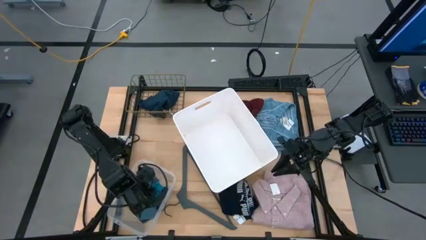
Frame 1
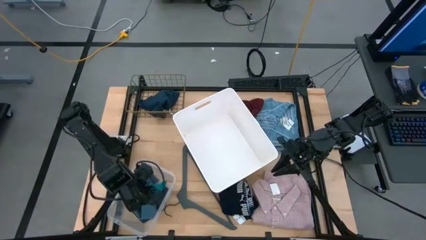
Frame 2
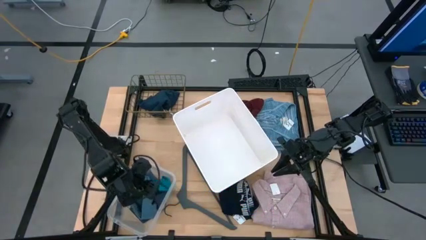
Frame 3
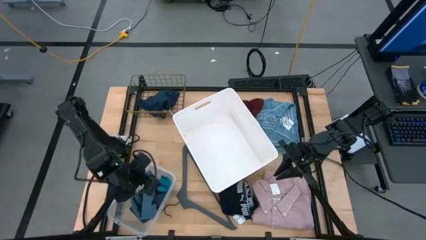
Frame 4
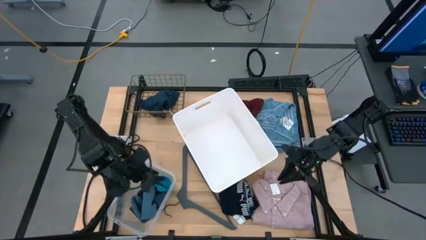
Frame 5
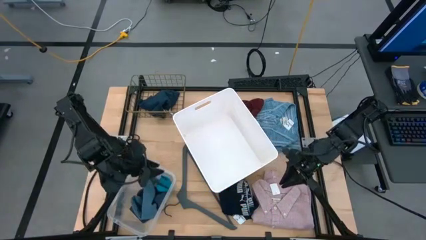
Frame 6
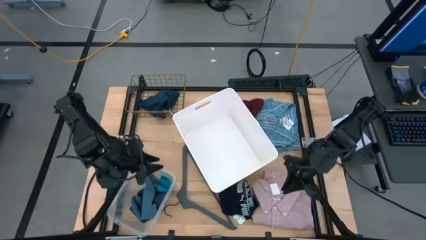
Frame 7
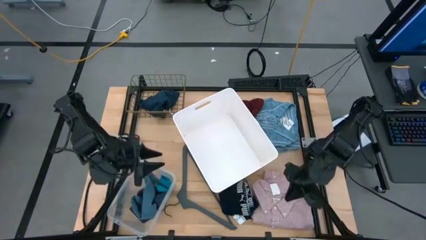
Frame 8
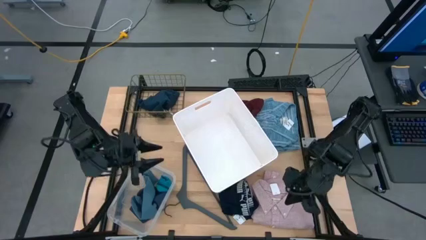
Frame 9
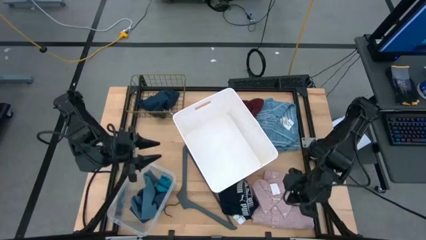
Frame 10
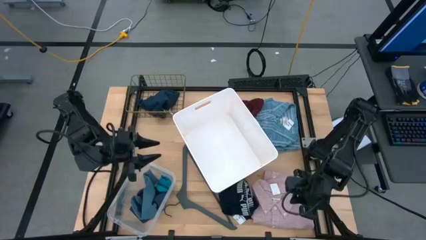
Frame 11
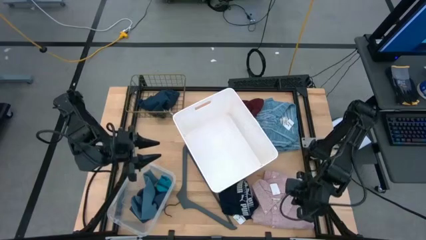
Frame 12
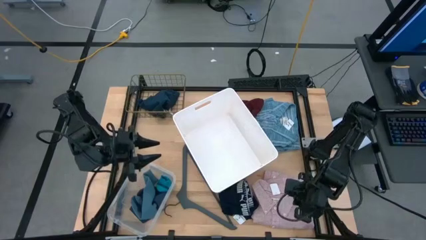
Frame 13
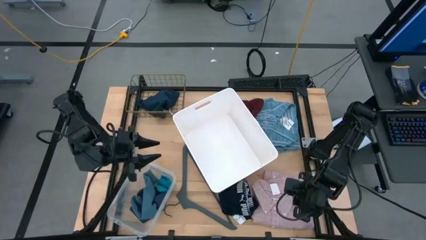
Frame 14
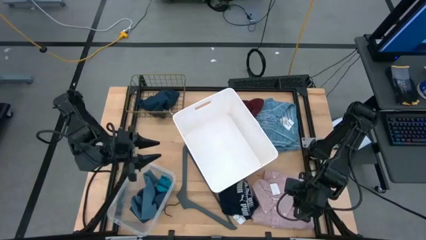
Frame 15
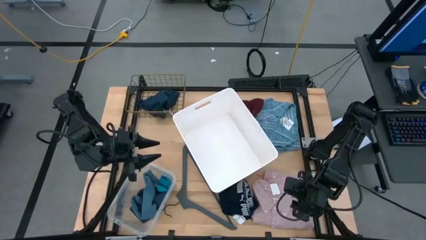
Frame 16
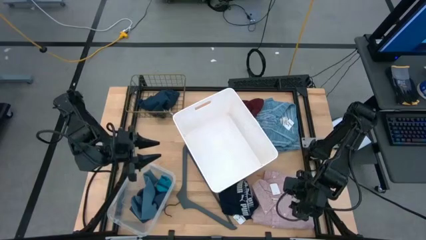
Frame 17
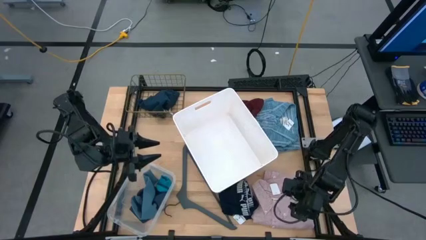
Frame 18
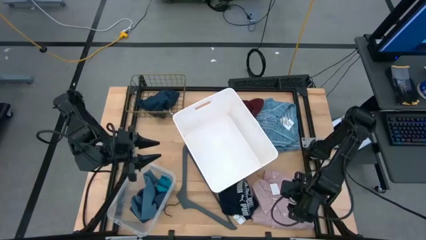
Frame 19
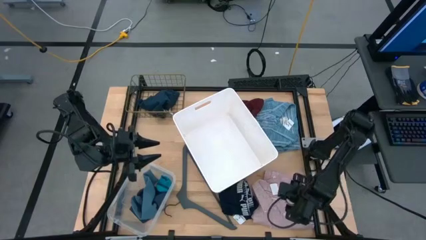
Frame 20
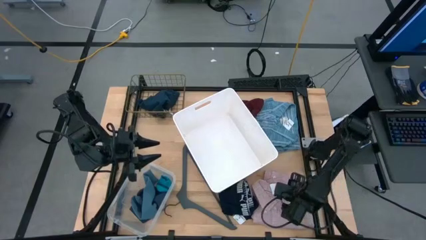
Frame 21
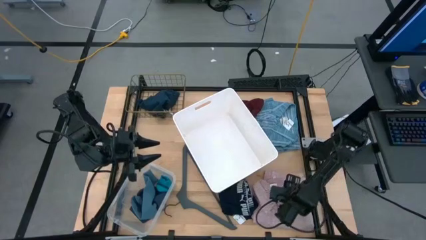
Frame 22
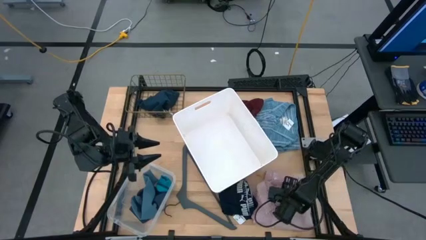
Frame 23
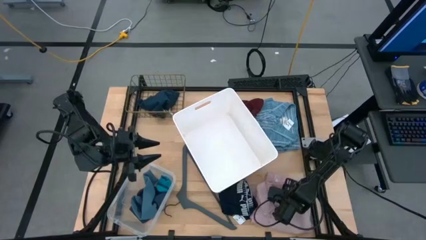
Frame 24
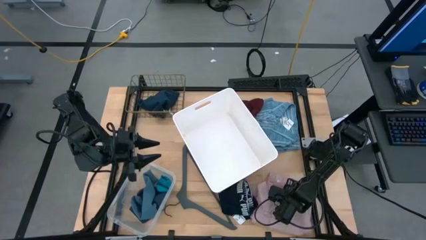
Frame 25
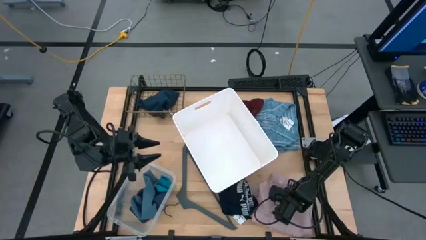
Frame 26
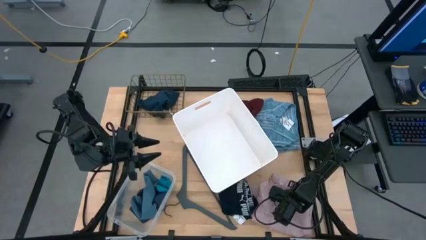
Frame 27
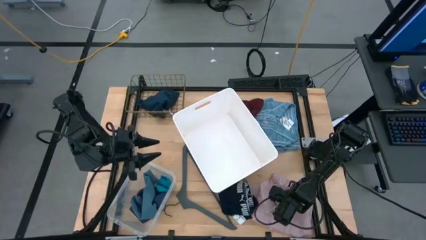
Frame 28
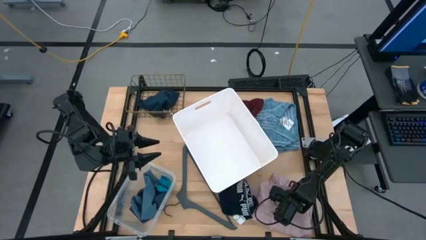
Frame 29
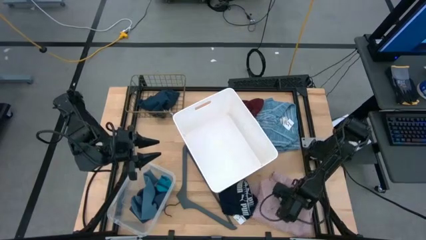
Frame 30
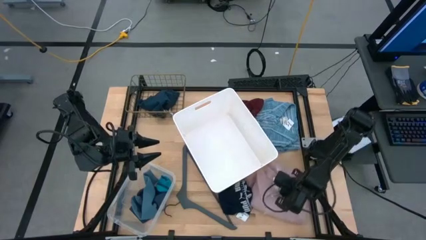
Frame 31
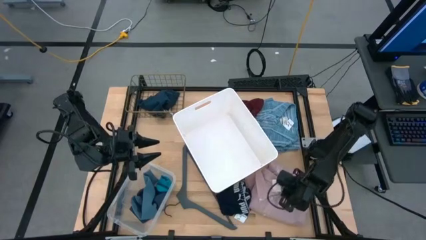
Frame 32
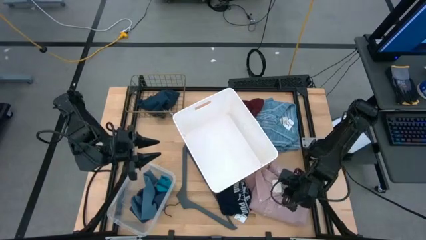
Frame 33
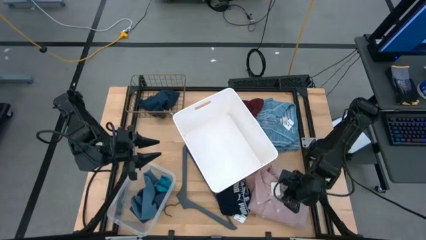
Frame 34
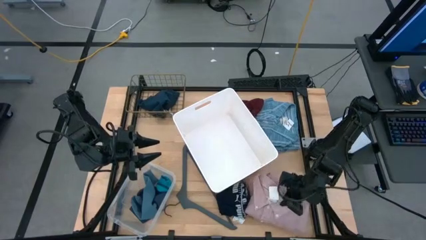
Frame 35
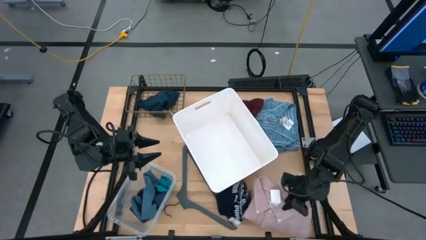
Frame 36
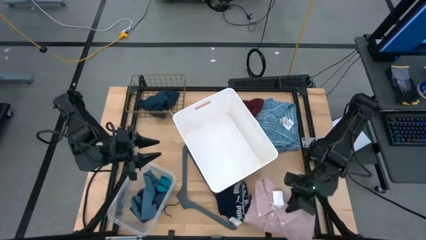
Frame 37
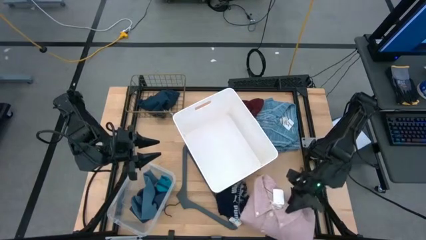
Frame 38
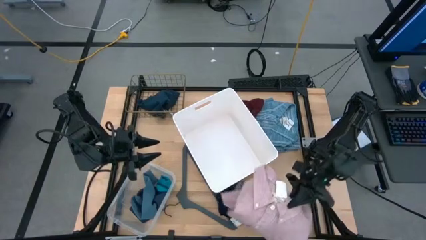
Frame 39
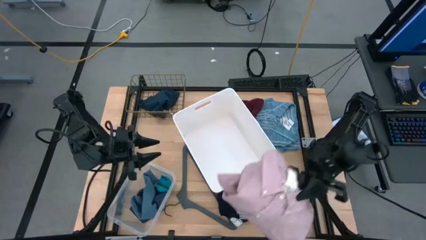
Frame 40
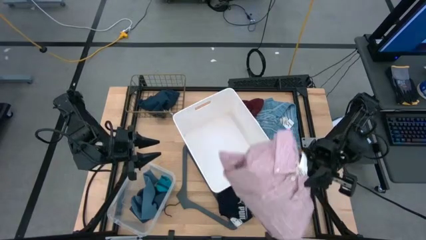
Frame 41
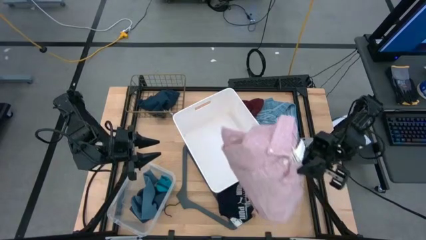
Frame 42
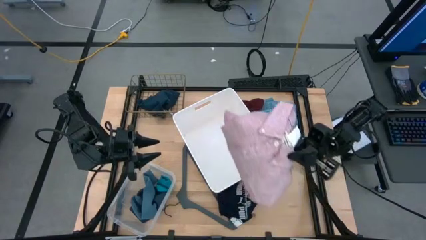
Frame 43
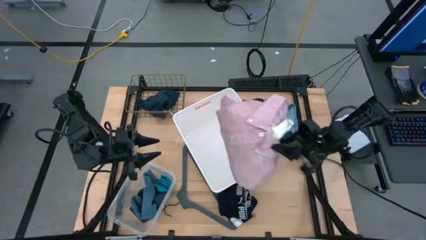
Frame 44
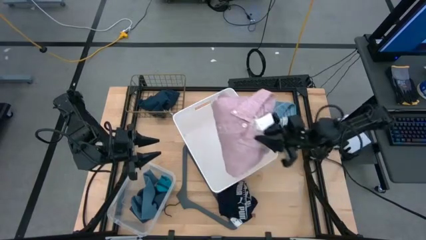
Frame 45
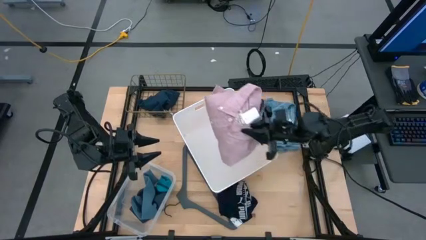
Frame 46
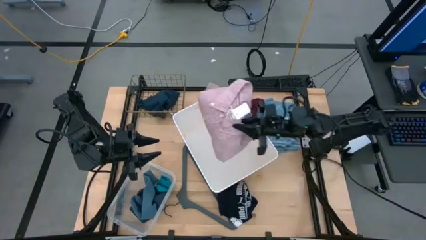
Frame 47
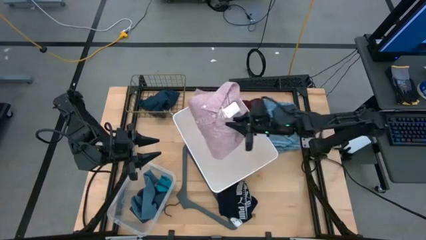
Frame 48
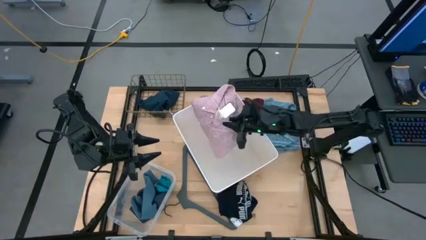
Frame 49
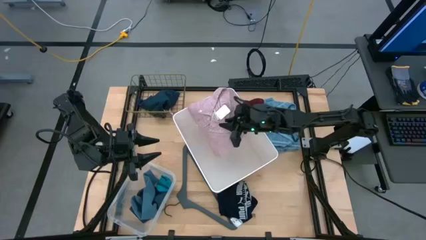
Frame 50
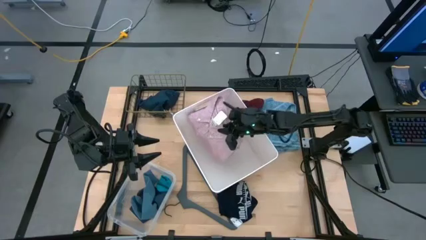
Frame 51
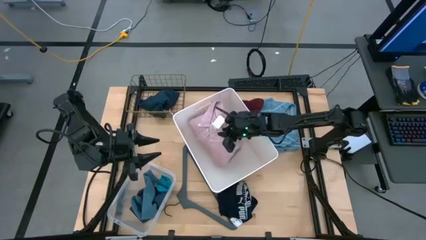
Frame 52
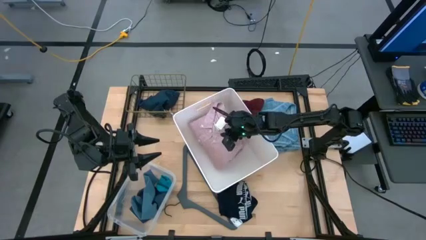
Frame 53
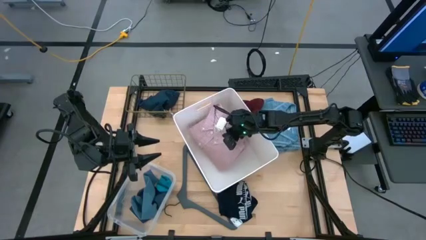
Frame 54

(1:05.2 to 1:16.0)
Task: Pick & Place Cloths
Put the pink shirt into the white bin

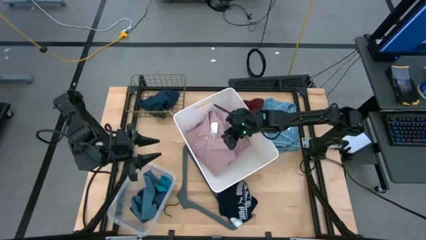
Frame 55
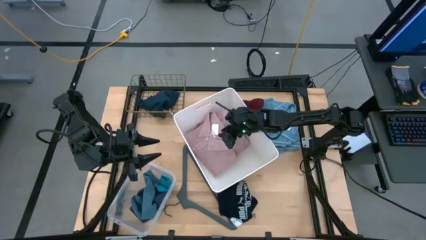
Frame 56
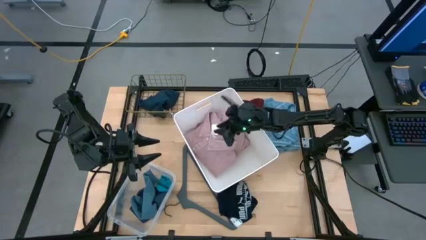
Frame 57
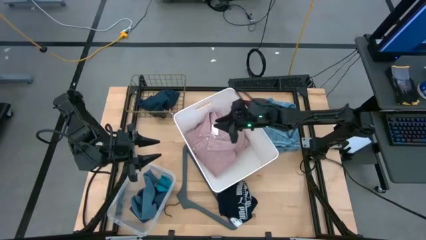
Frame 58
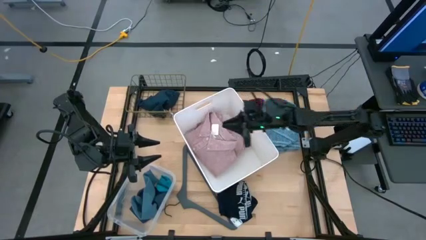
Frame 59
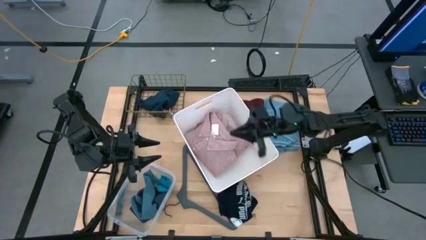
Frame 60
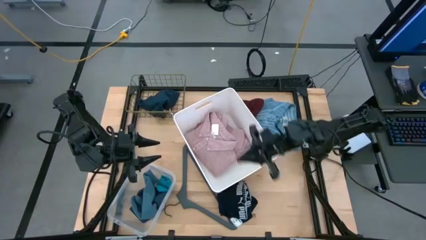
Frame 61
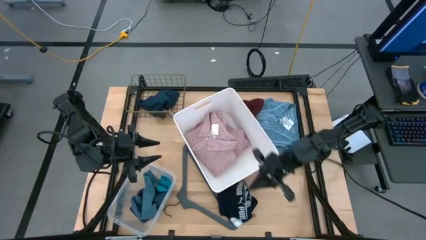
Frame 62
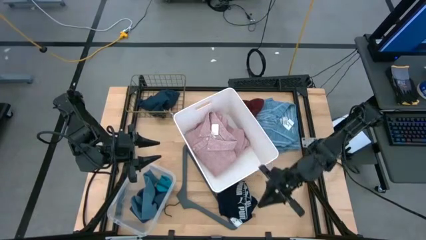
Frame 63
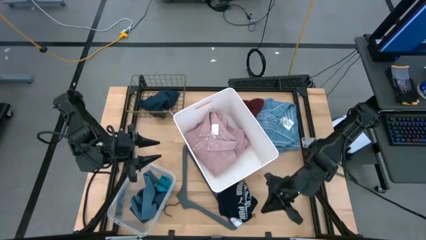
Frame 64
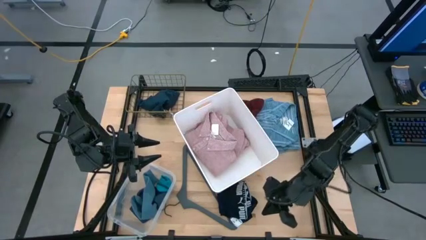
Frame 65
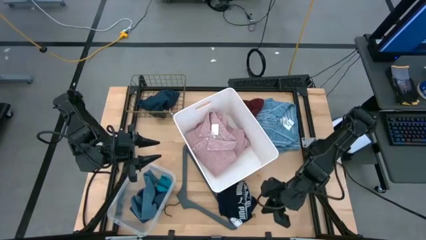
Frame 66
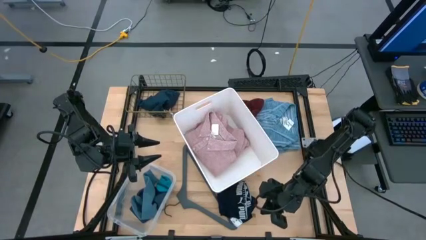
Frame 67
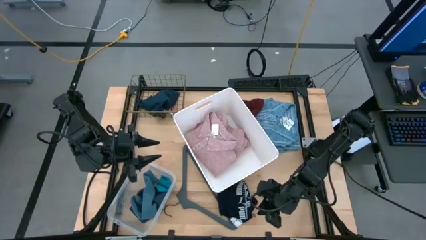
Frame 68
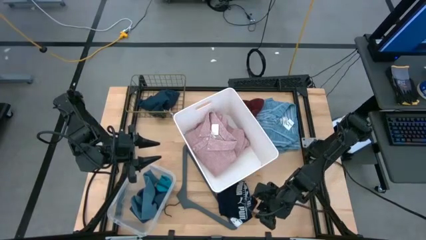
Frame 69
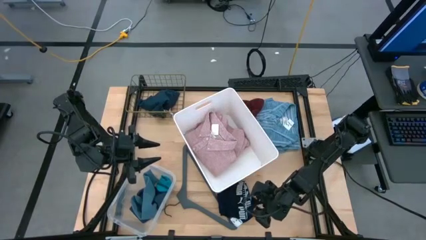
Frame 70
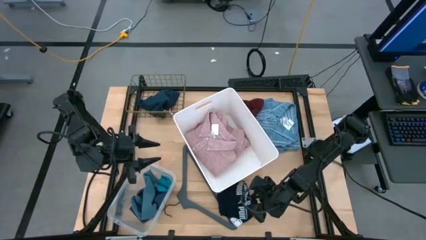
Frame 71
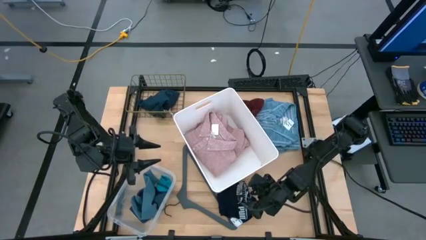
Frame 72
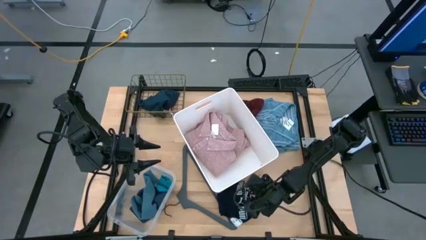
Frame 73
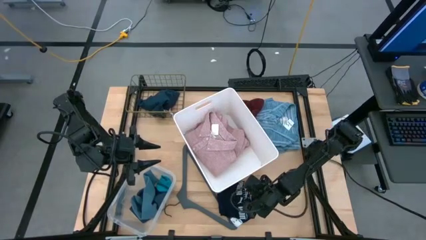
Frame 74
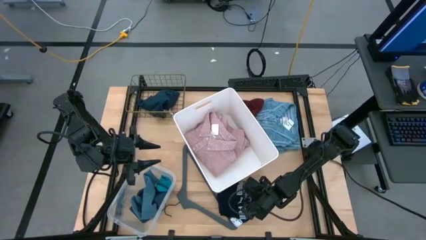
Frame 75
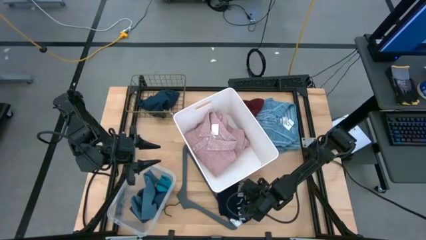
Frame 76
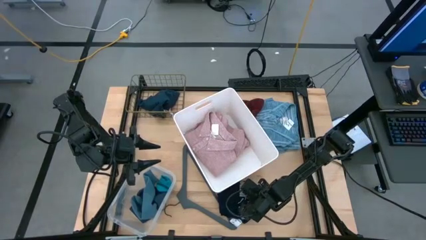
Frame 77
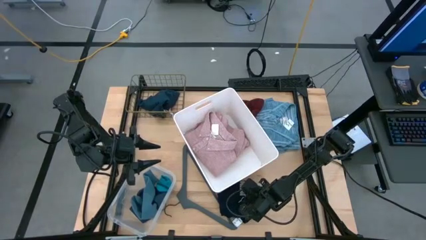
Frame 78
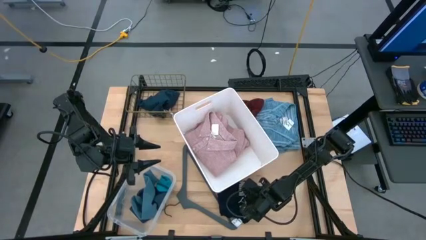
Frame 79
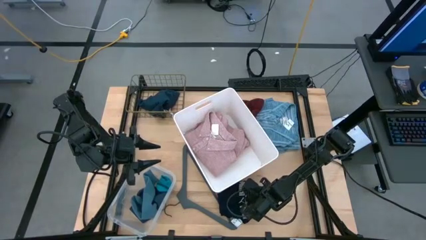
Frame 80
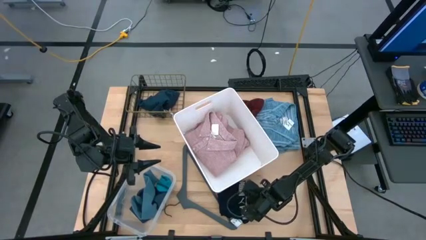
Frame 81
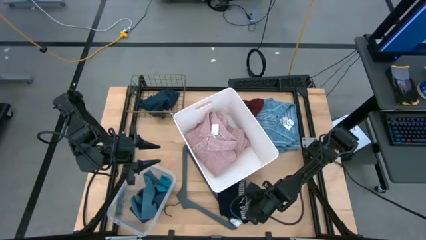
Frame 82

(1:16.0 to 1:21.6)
Put the blue briefs into the wire basket
